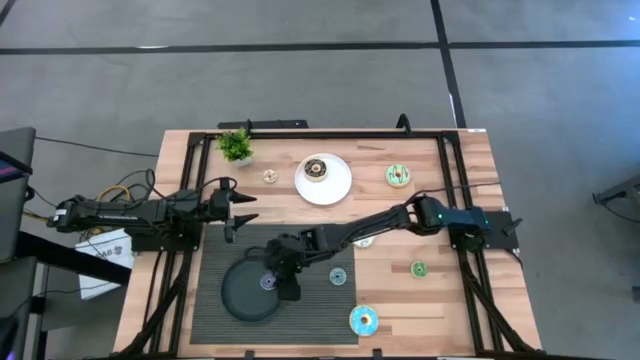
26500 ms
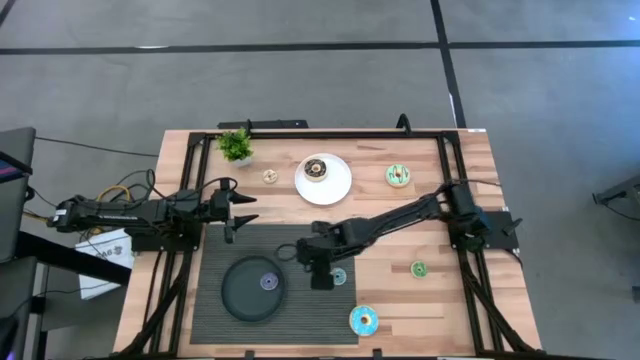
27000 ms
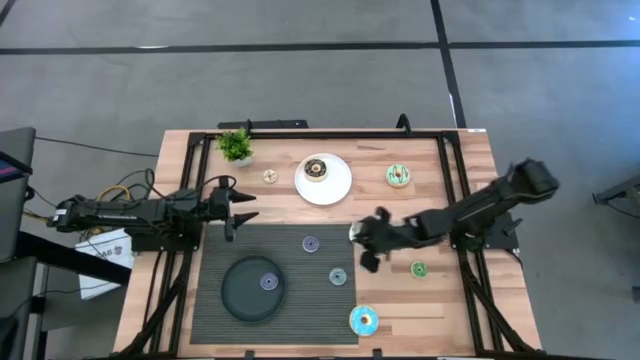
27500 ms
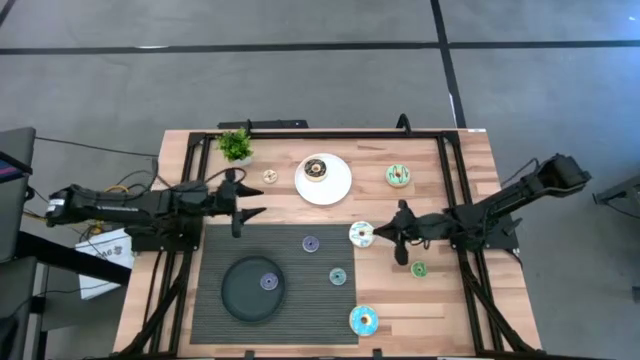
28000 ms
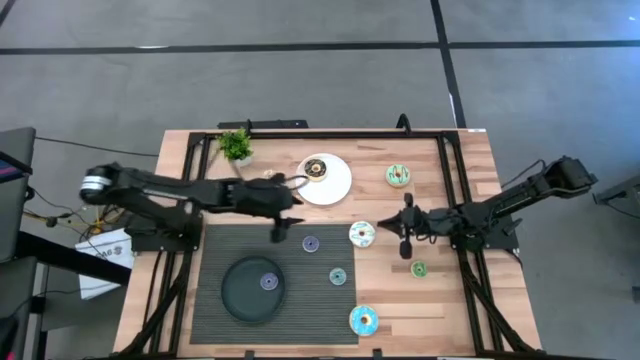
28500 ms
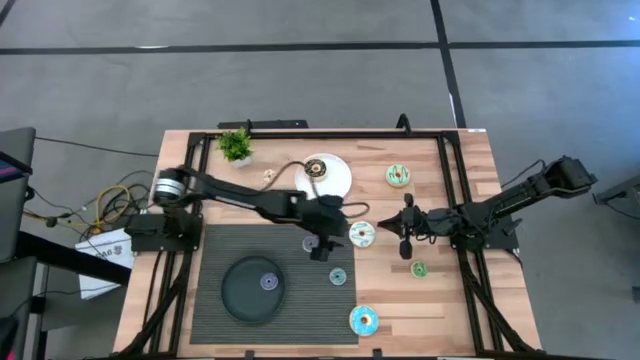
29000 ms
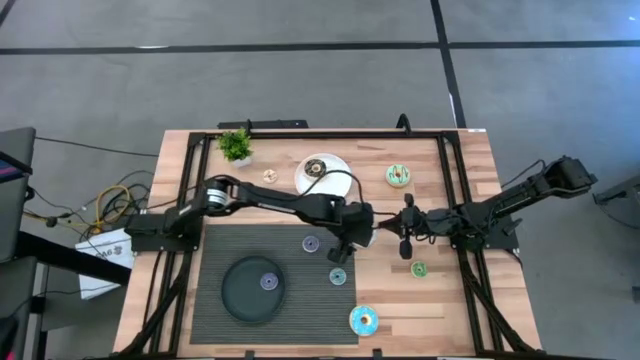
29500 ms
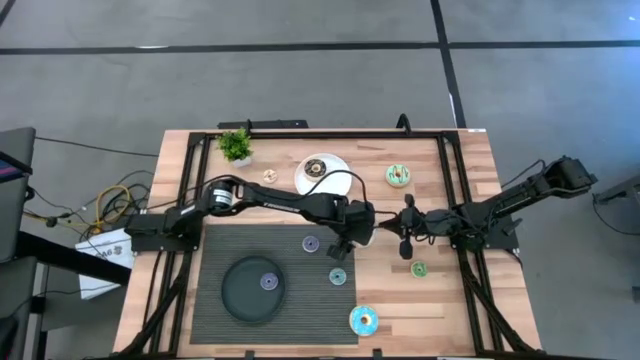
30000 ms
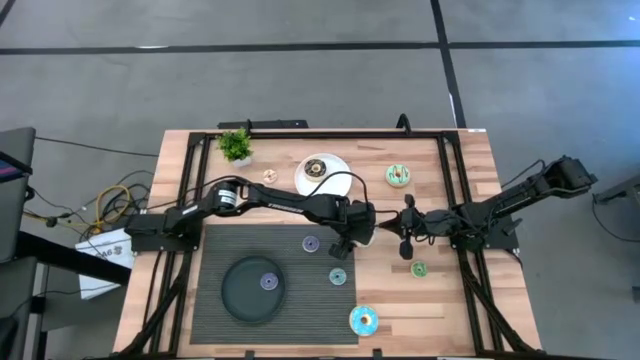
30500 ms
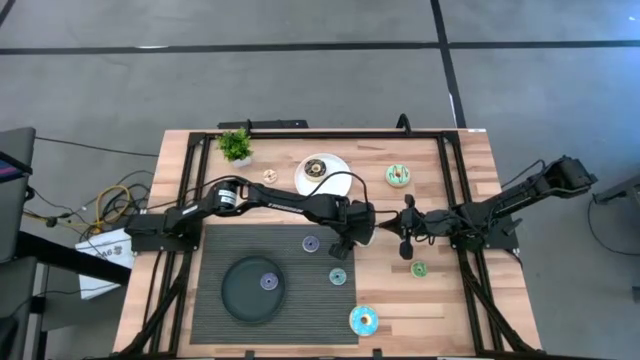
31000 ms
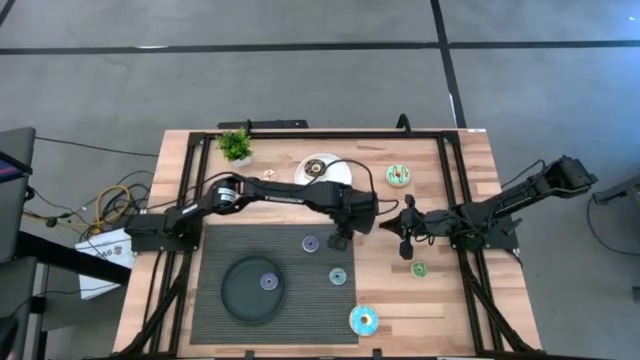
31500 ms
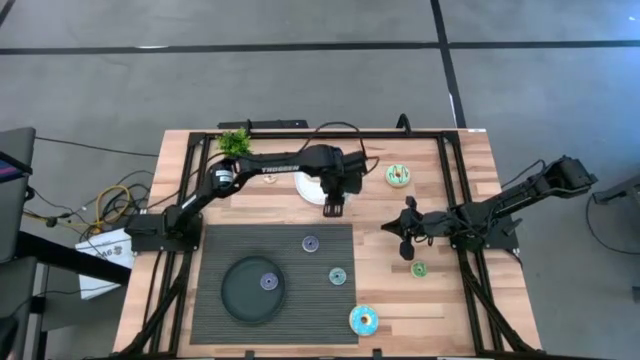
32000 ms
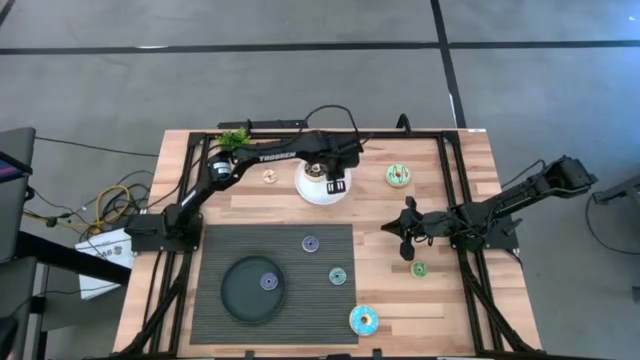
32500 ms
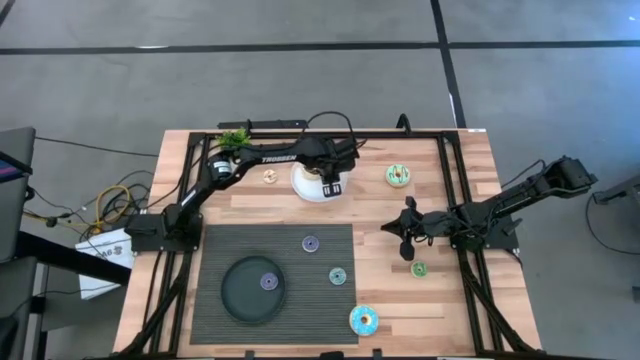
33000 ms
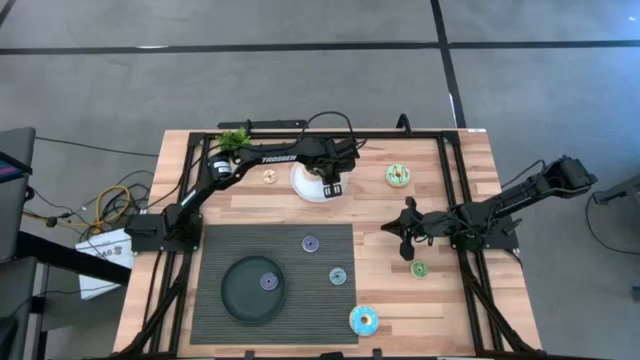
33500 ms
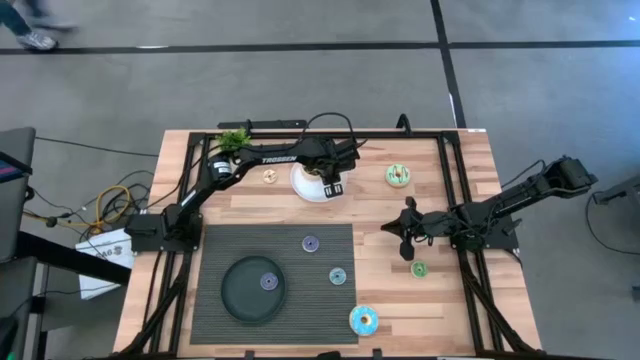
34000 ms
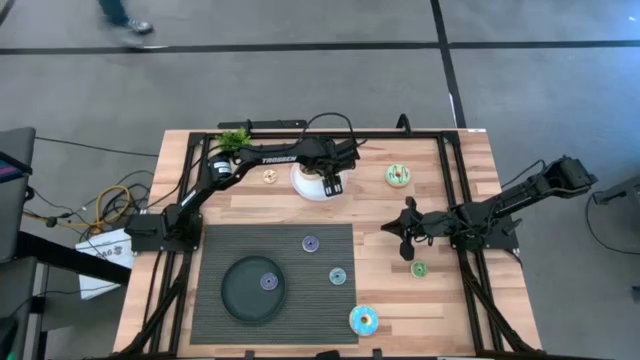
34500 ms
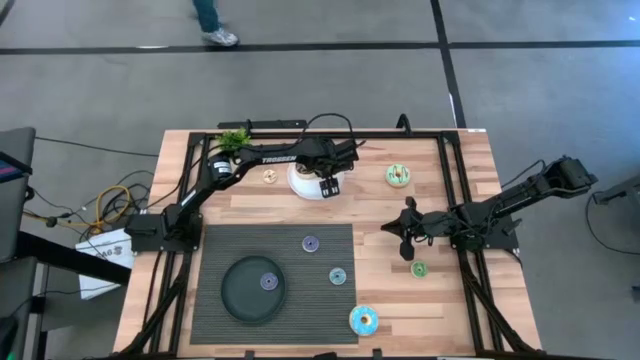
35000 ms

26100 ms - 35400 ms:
Task: Pick & Place donuts
Put the large white donut on the white plate

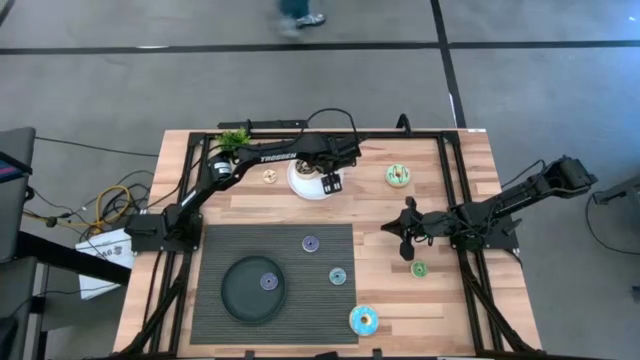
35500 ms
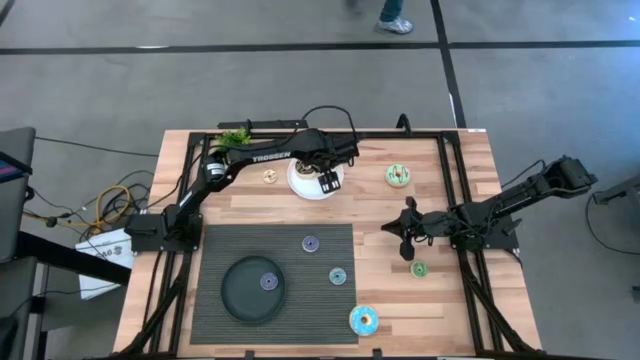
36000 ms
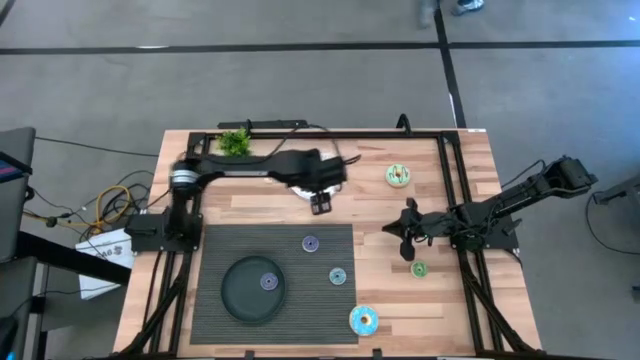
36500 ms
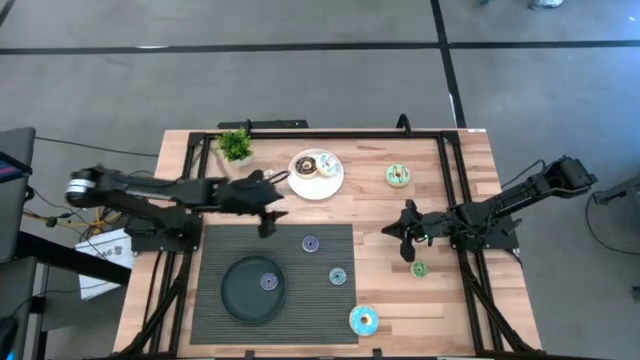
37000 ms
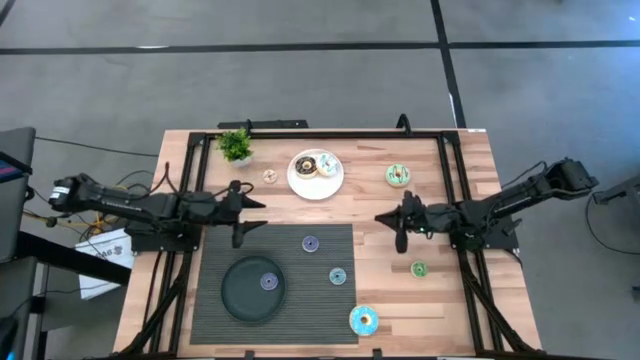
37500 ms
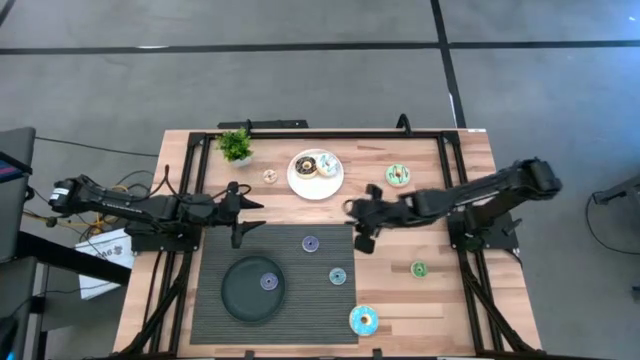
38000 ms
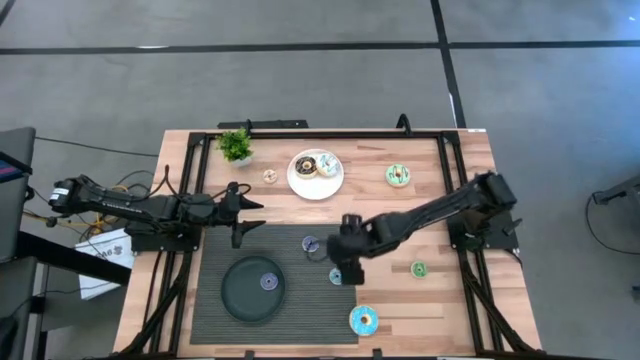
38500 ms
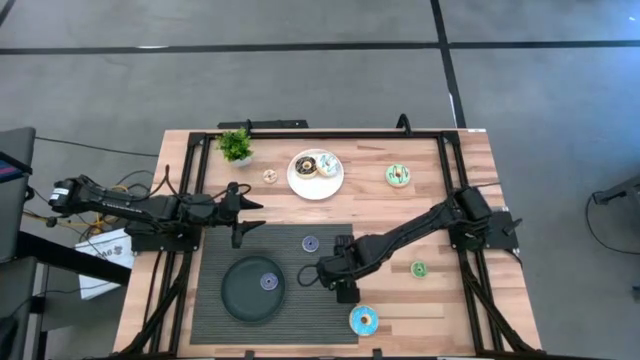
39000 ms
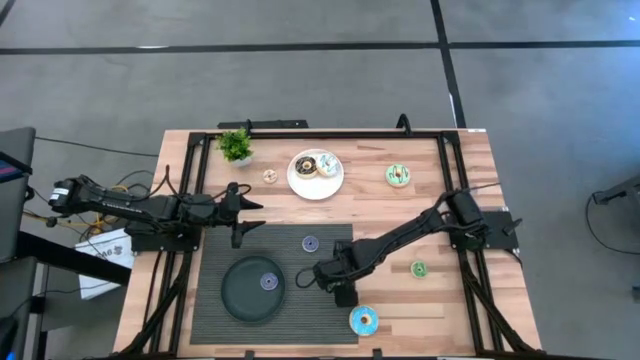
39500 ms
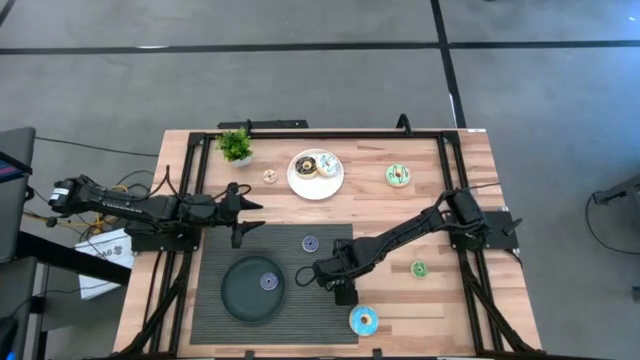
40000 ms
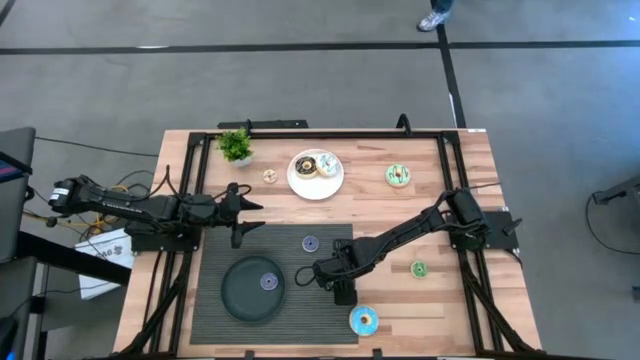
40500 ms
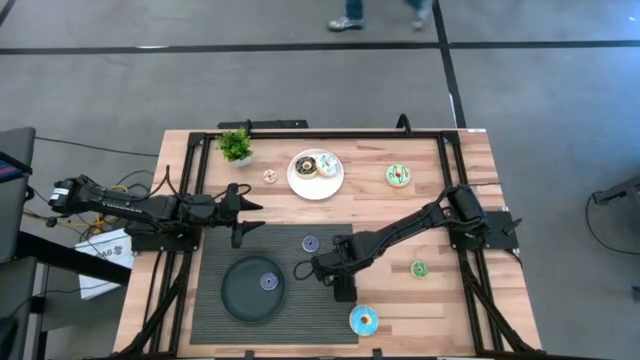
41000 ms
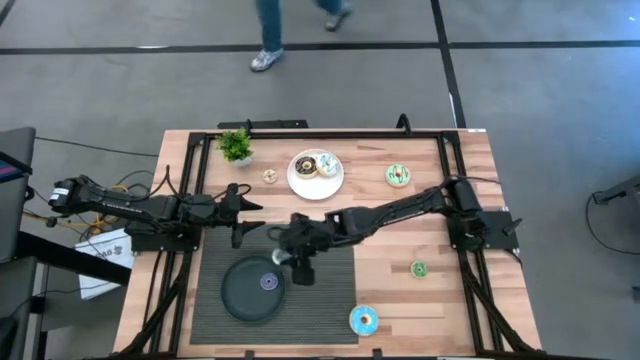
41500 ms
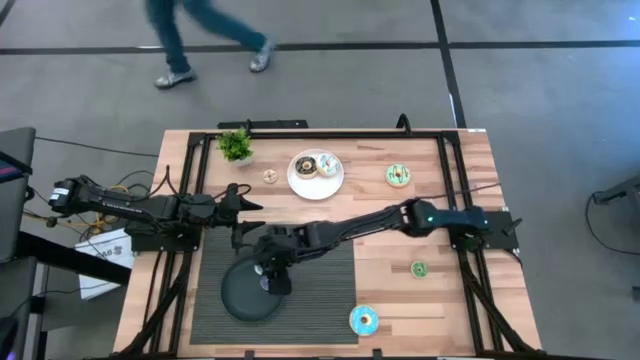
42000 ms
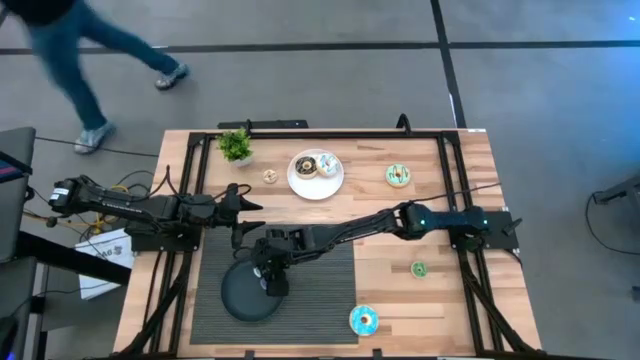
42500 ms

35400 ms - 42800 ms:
Put the small blue donut on the black plate

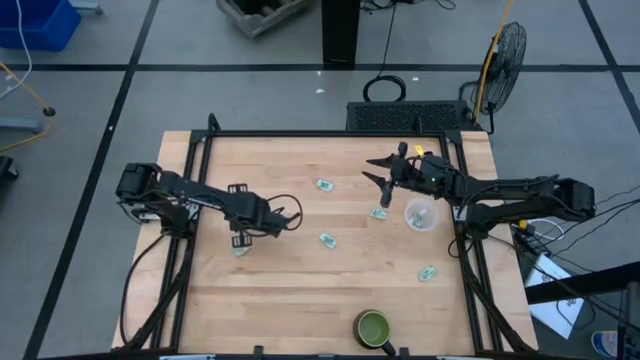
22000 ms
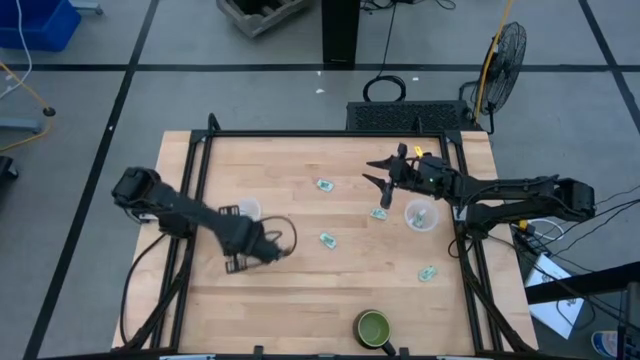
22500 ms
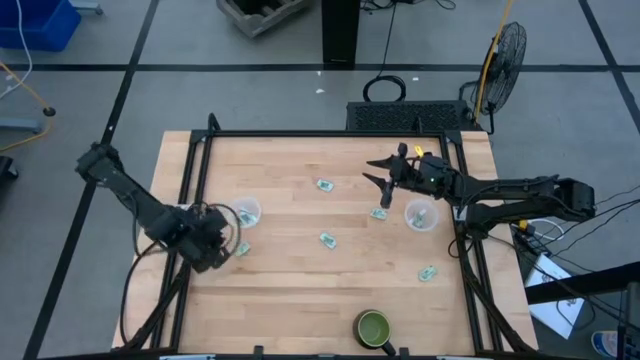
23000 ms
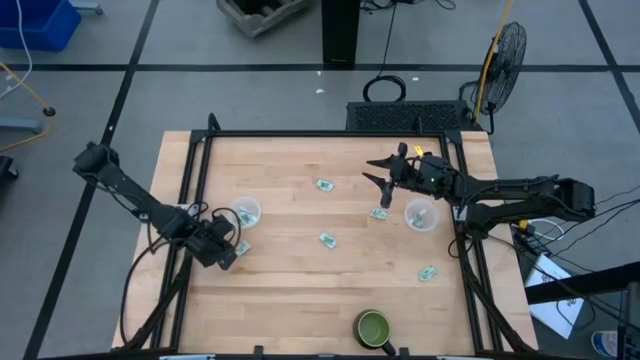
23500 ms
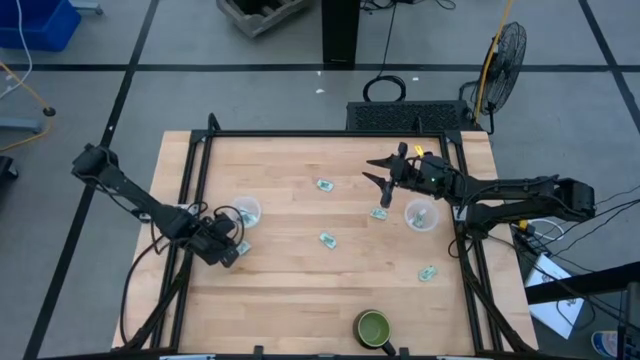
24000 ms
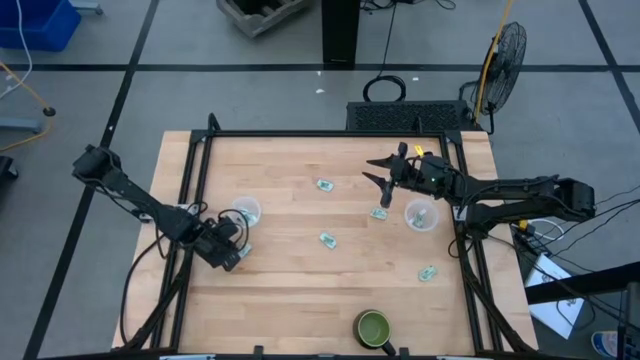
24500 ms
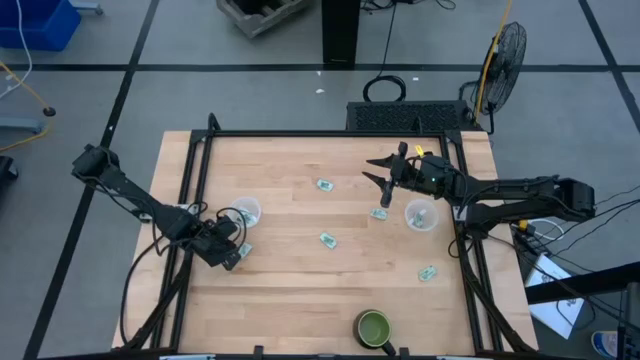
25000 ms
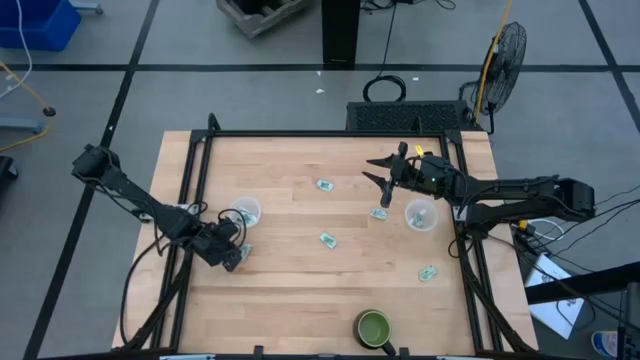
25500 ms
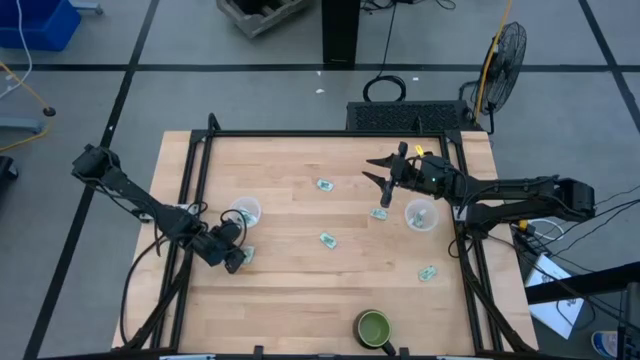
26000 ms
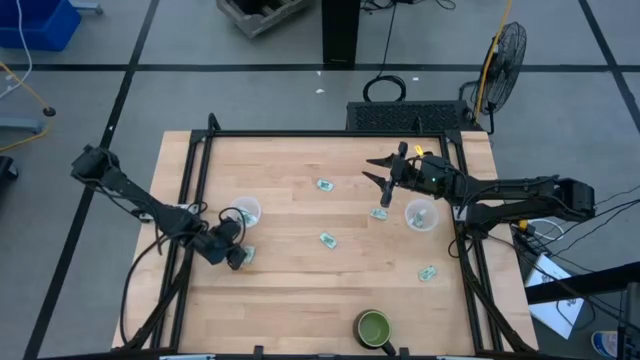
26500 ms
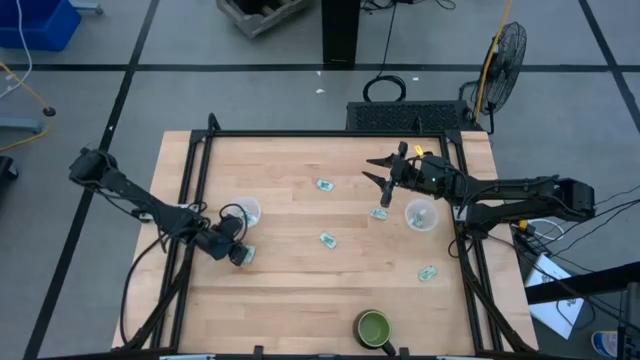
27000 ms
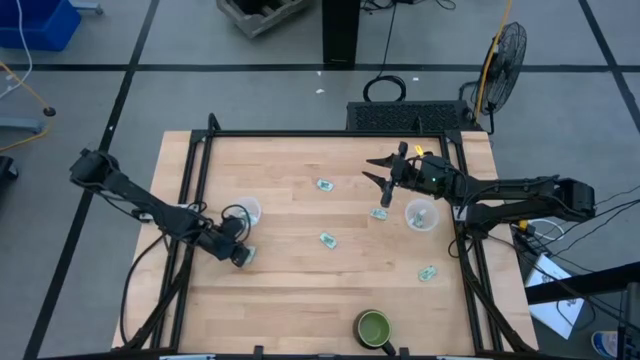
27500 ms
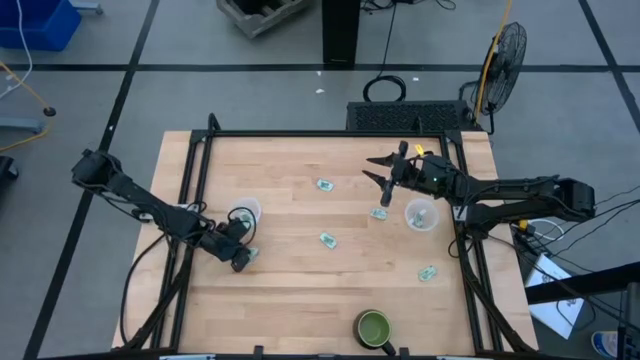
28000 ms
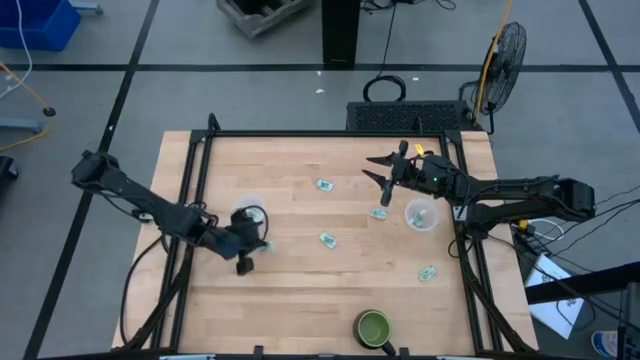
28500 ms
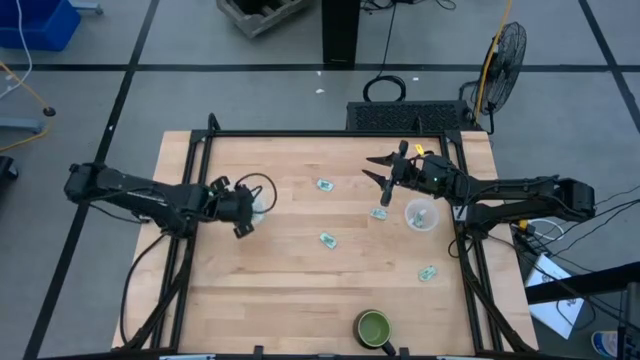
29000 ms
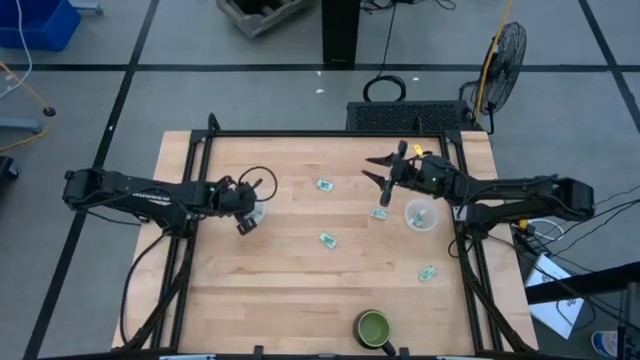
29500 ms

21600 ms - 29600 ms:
Task: Pick and place Stevia / Truvia into bins
Put the stevia packet into the left transparent container
